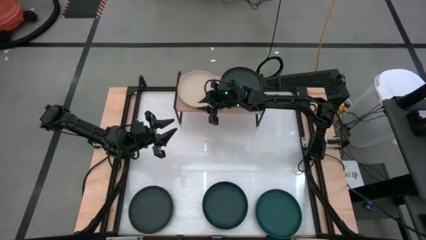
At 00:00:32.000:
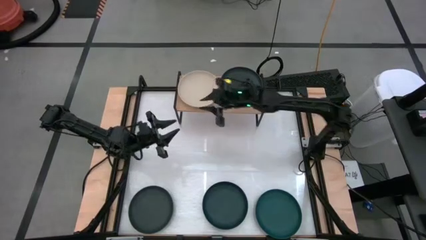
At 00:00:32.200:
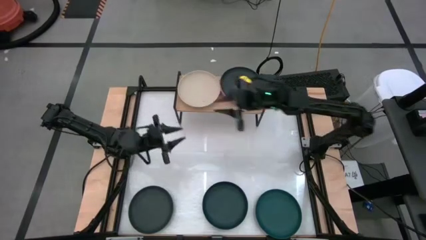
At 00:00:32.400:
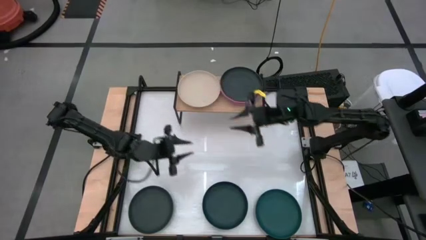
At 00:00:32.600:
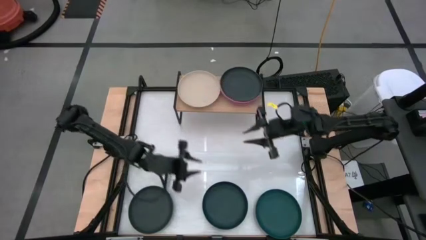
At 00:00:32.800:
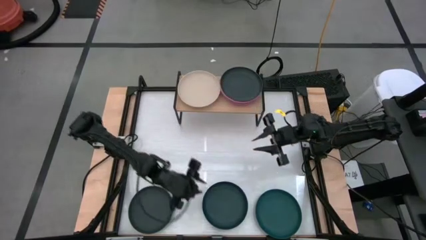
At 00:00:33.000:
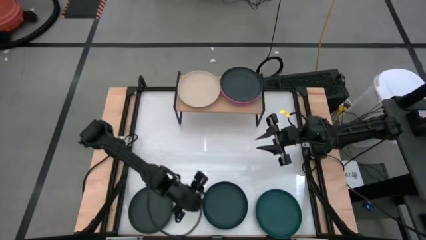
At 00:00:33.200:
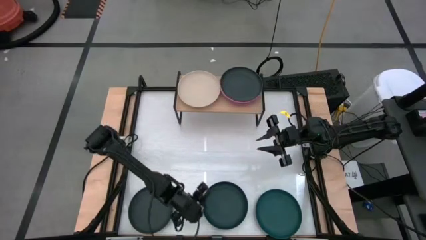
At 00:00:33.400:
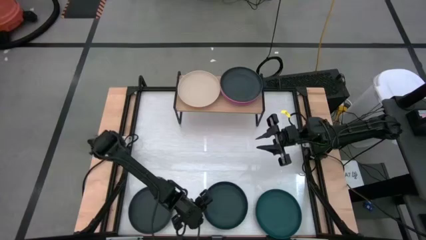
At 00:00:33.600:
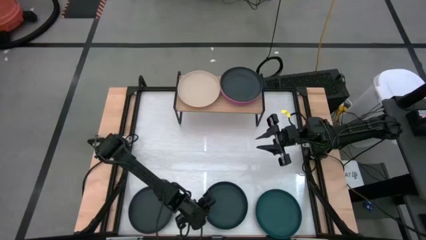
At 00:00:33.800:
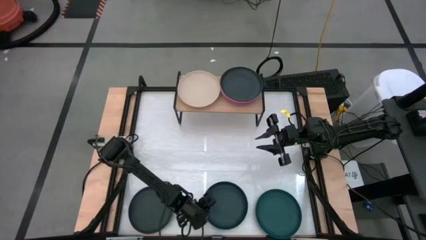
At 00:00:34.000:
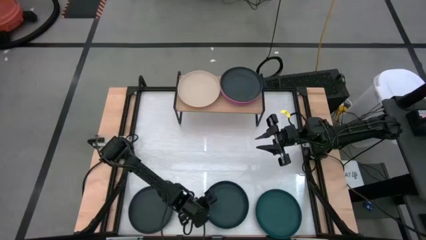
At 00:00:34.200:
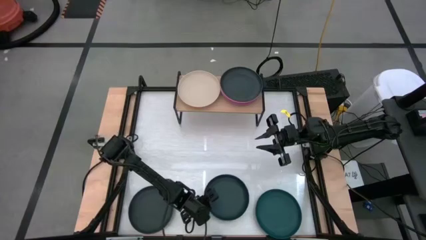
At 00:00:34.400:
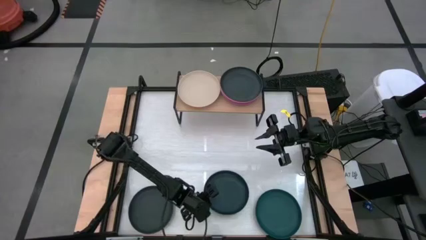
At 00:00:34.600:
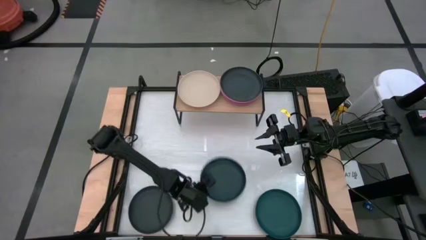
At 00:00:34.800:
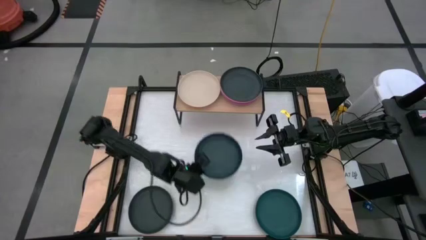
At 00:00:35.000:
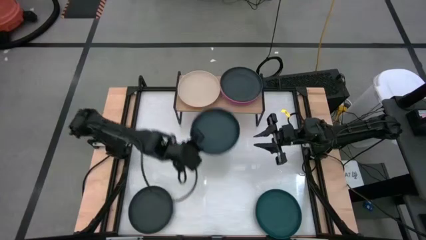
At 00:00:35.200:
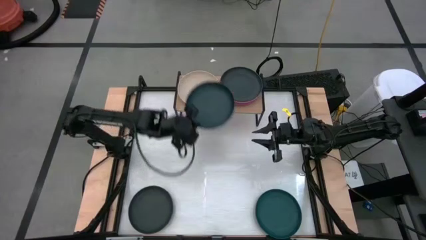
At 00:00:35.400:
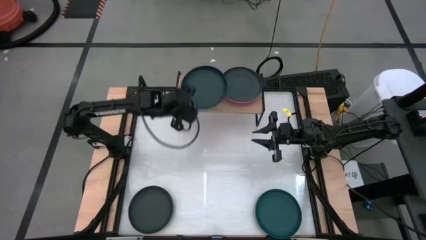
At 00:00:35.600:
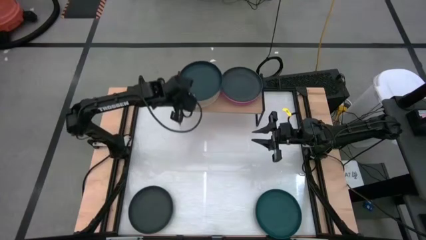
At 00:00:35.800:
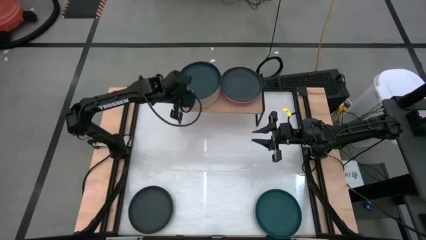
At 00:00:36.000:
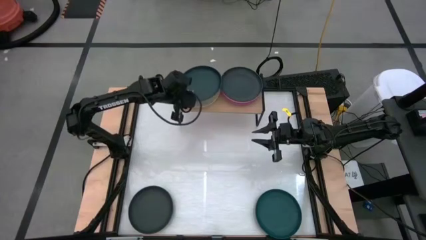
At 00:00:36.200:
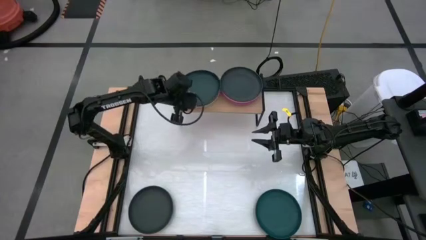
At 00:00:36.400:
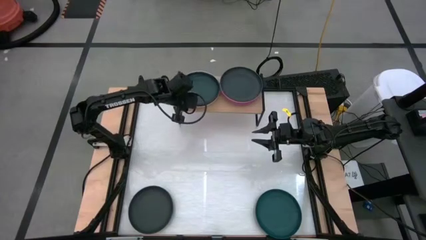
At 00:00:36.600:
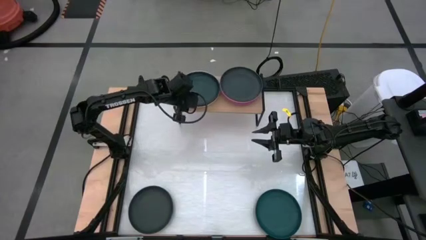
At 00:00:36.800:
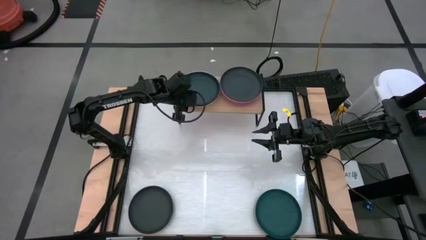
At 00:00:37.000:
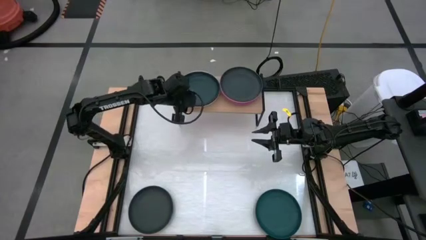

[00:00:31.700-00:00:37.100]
Task: Place and stack plates onto a shelf
Stack the dark green plate on top of the brown plate on the shelf

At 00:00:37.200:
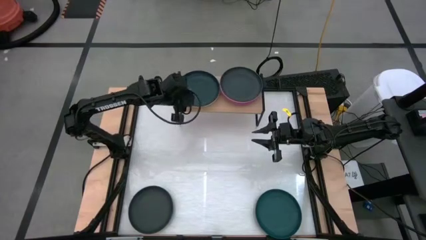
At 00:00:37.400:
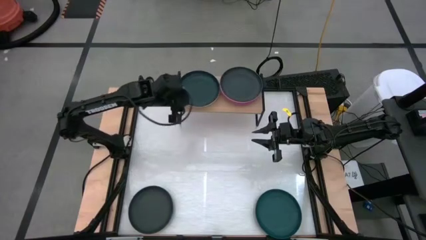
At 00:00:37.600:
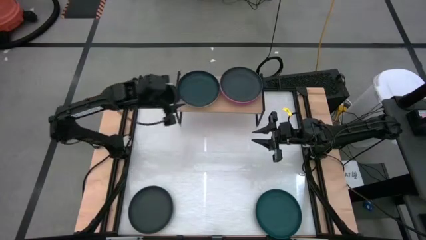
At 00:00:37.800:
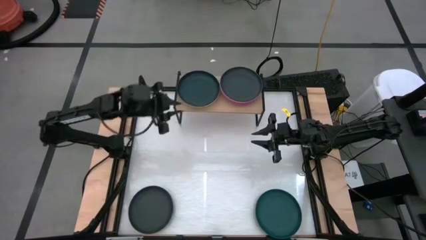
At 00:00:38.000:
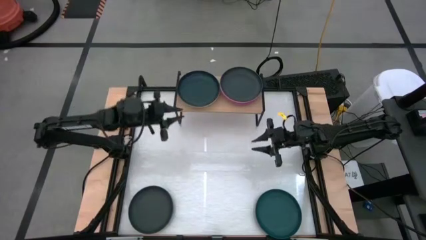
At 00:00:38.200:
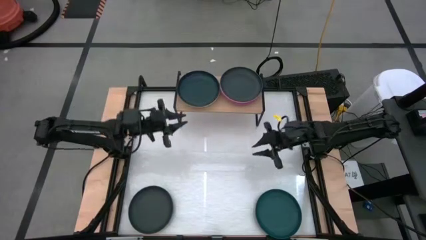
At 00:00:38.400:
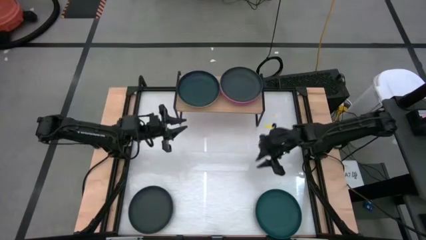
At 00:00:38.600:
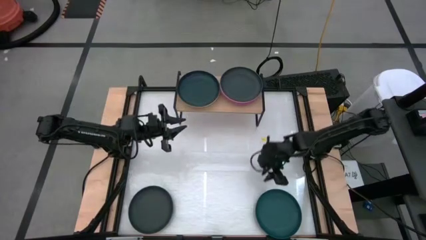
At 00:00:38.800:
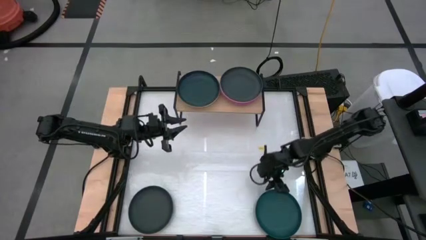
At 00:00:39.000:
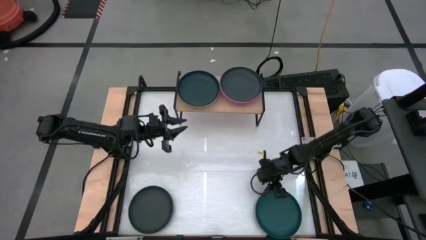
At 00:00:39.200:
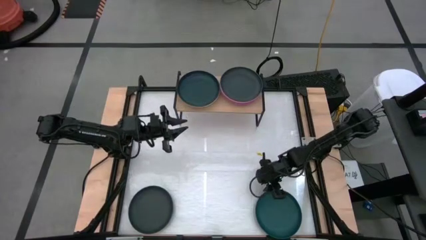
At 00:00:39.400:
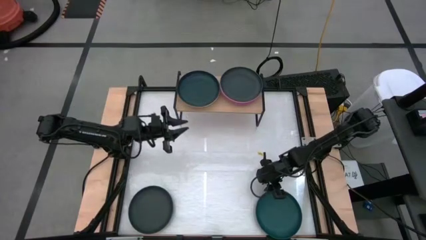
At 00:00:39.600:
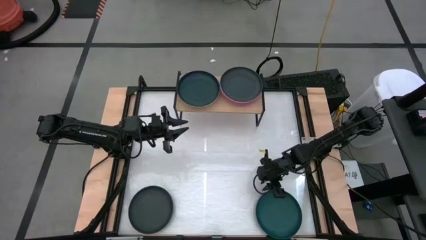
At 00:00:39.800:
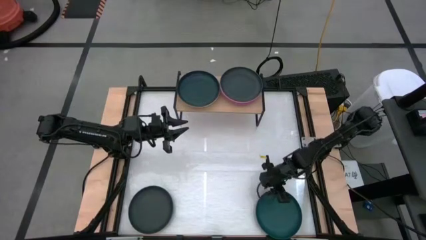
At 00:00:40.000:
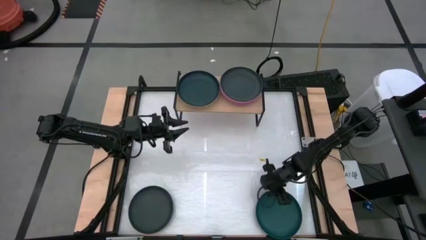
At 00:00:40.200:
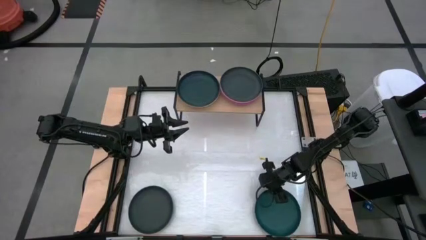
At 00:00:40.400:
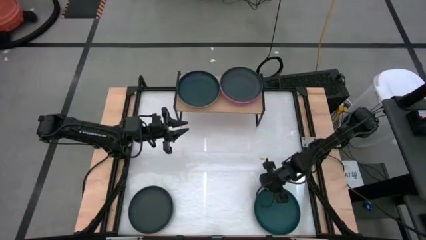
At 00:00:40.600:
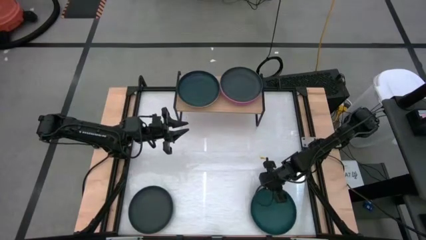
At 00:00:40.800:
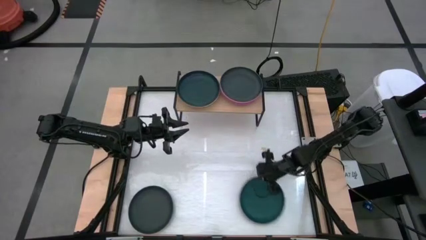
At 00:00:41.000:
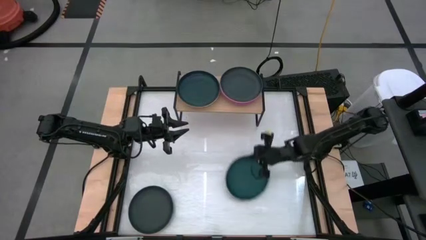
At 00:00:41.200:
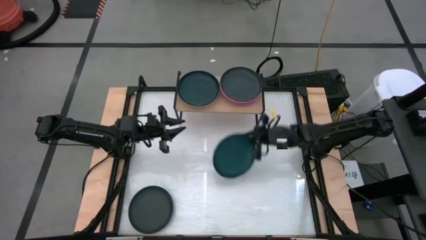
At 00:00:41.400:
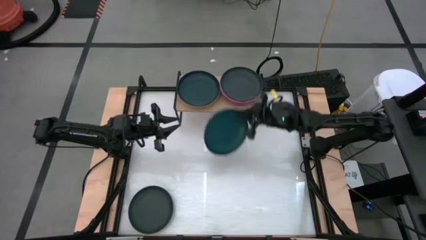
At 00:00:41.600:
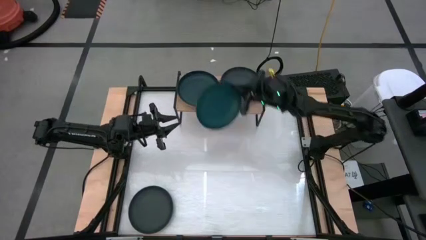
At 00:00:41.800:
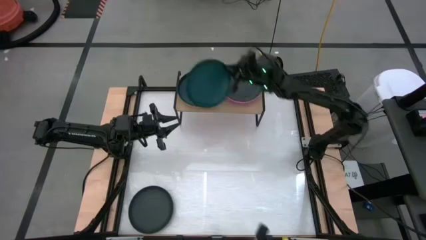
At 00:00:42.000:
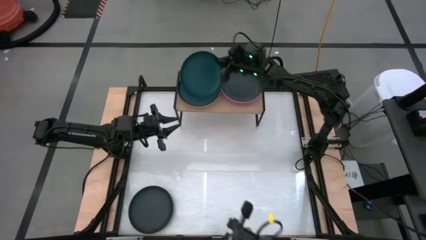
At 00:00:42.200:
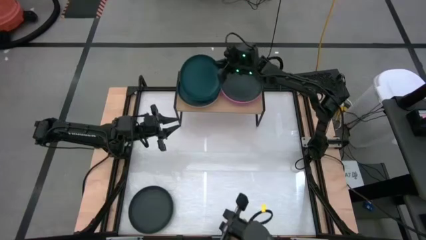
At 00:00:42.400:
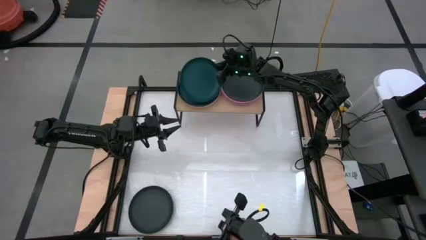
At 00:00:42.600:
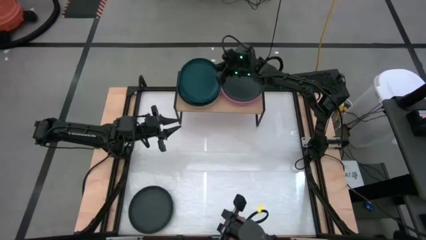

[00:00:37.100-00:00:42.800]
Stack the green plate on top of the dark green plate on the shelf

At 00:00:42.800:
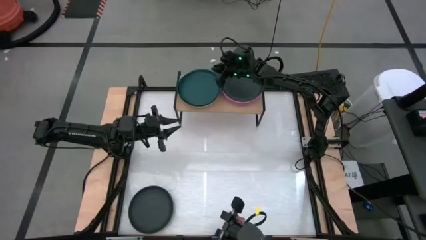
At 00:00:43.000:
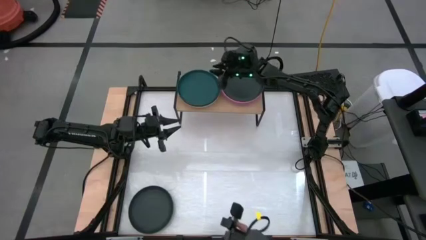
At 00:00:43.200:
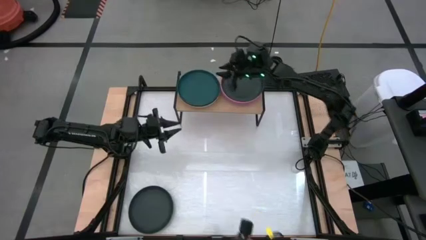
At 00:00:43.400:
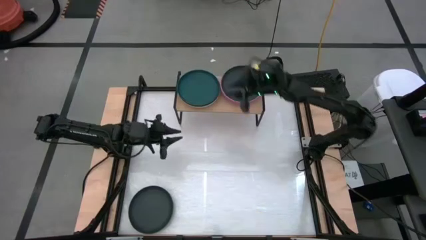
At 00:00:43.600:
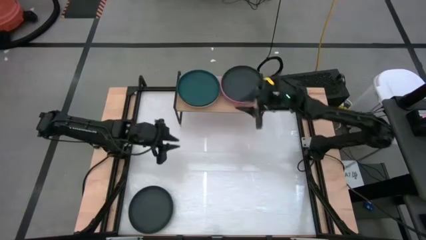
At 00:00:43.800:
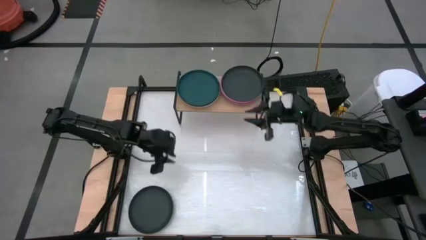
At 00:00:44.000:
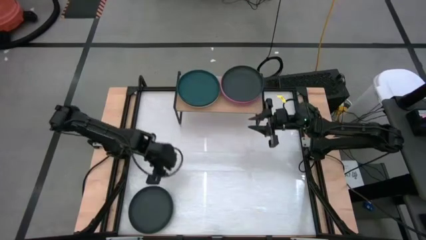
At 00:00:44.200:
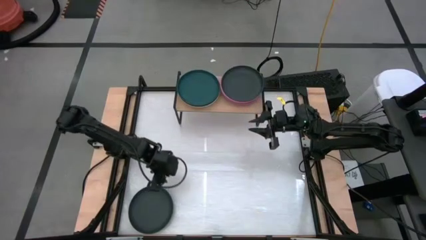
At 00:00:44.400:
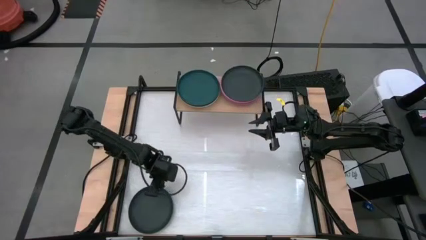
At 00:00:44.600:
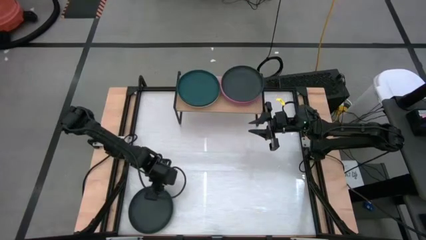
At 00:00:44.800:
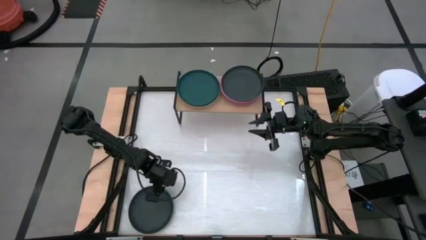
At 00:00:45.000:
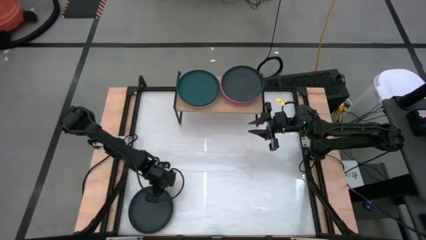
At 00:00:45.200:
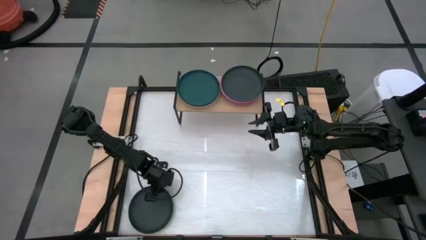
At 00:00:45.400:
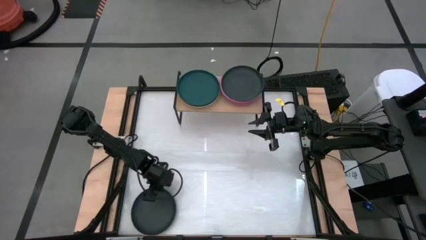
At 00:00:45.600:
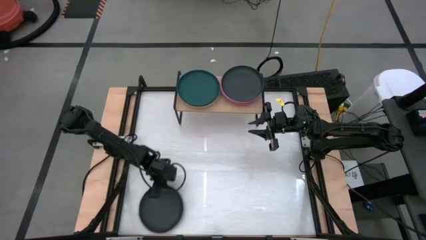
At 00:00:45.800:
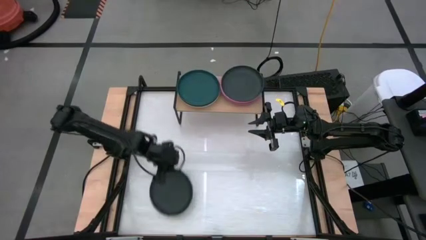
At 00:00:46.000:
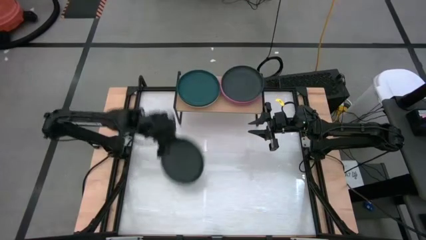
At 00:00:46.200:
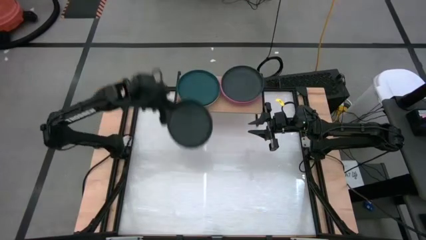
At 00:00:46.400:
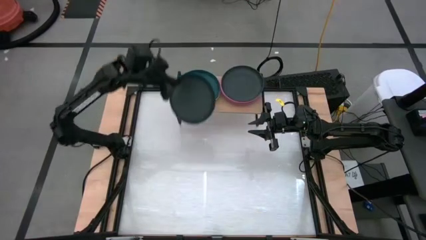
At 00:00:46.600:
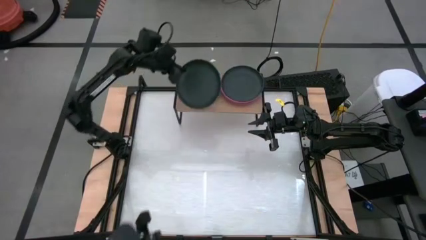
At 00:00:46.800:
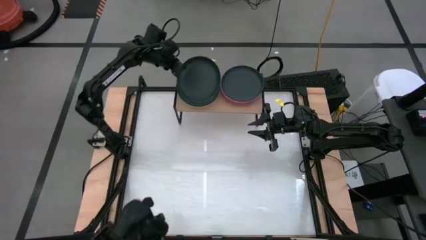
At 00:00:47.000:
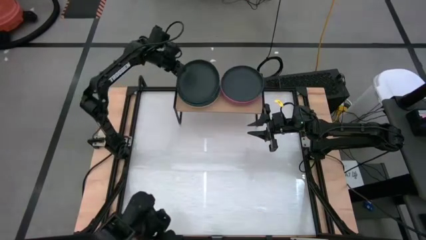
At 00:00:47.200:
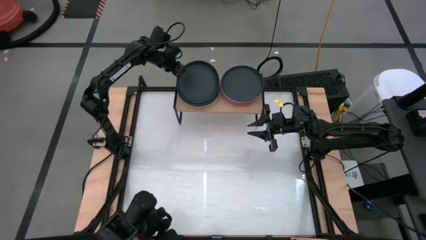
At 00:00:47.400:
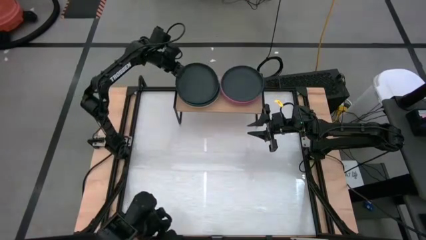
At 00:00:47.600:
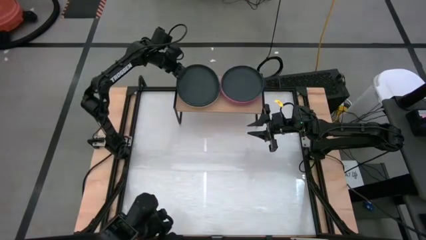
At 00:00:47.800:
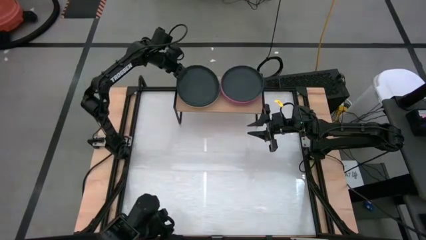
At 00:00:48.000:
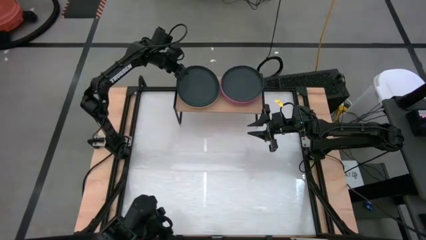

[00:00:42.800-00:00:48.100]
Stack the black plate on top of the green plate on the shelf

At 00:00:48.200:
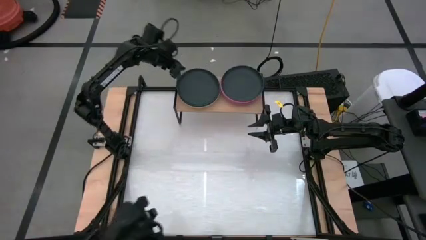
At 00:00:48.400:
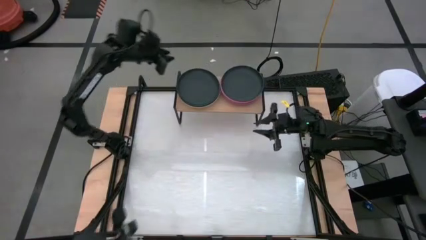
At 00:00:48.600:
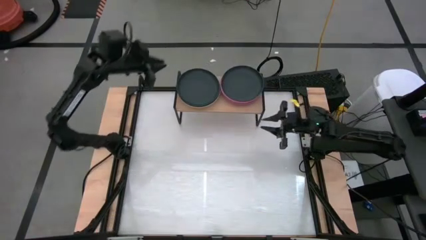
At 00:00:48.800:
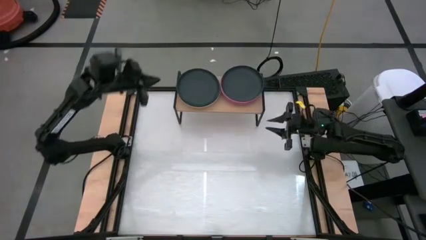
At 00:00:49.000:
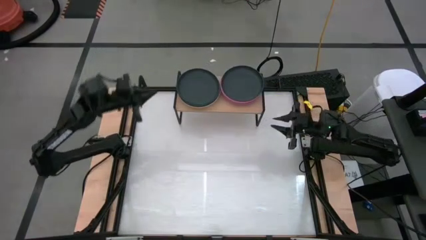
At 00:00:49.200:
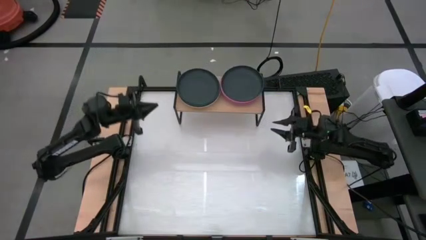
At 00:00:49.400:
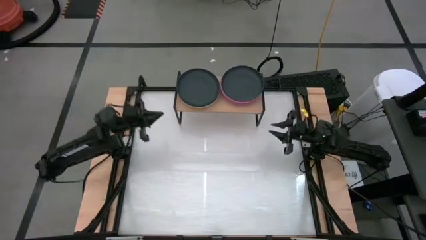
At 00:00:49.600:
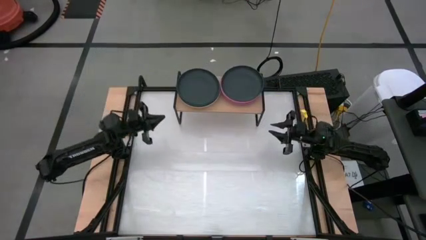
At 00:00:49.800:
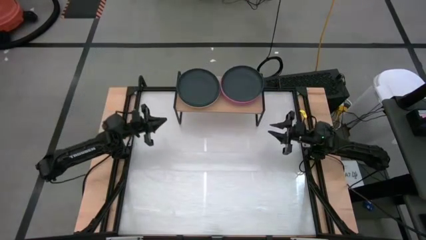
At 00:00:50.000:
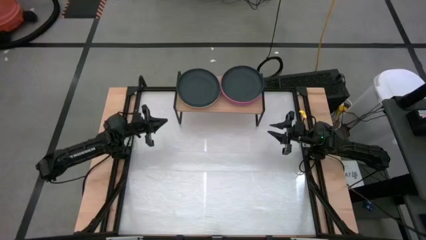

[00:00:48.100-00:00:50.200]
Return to Home Position
